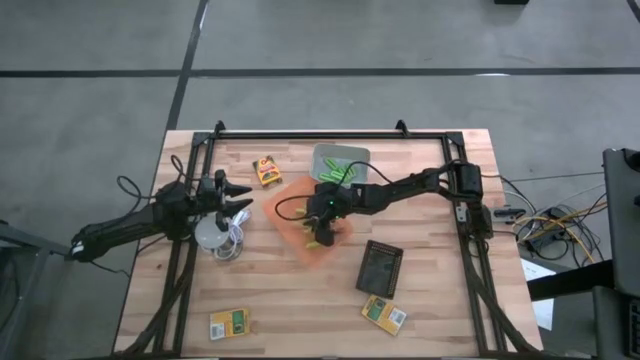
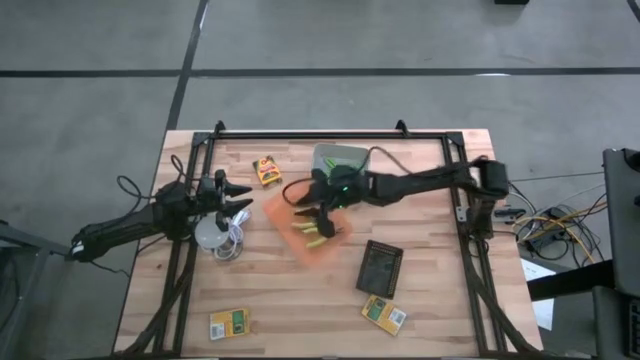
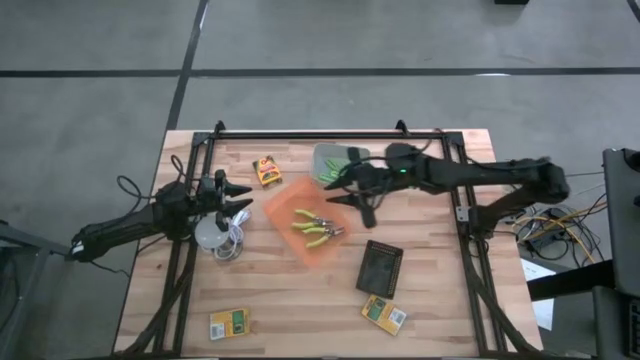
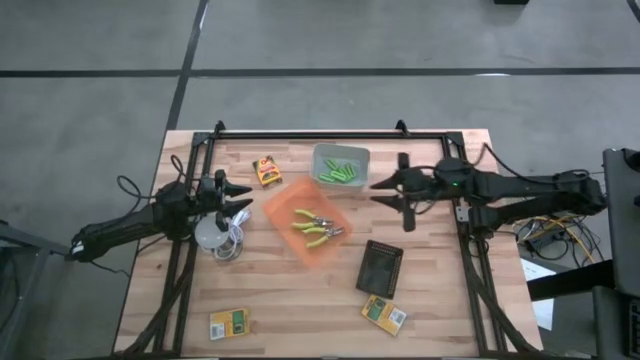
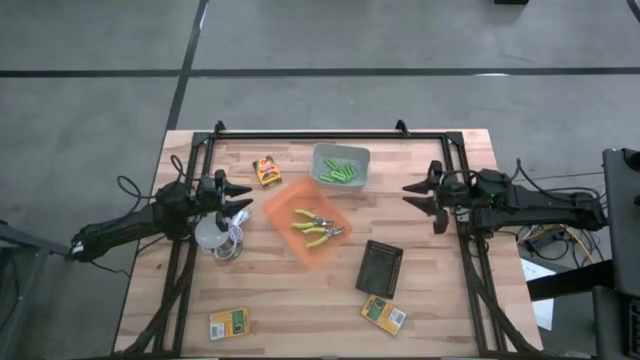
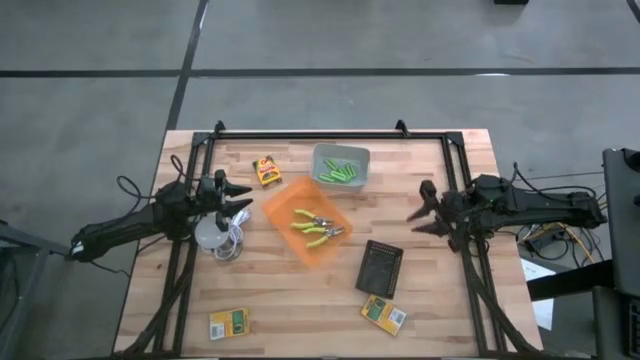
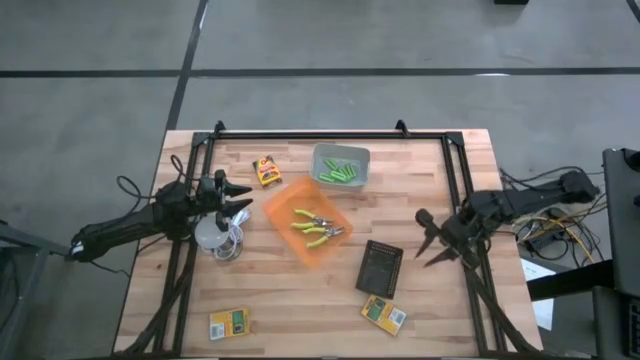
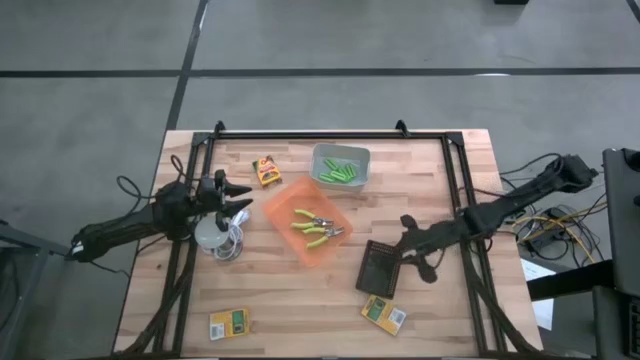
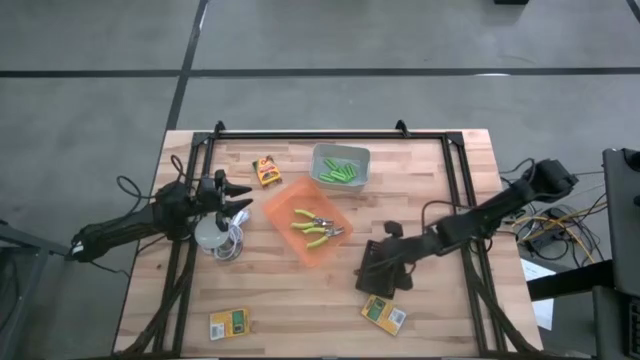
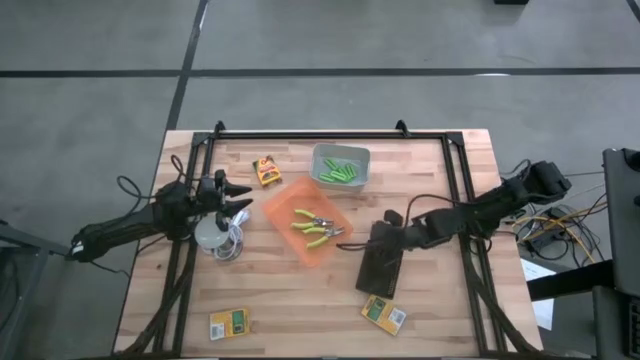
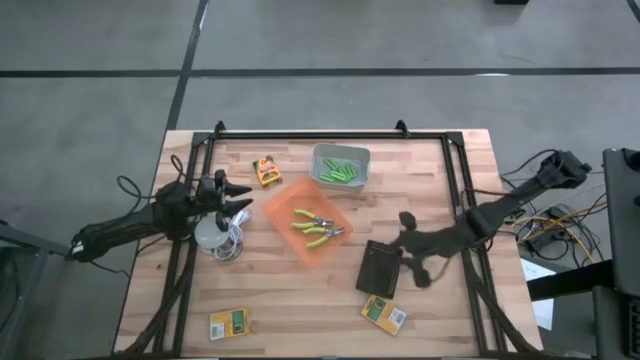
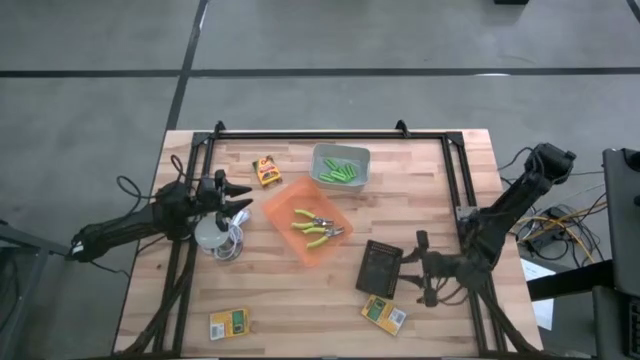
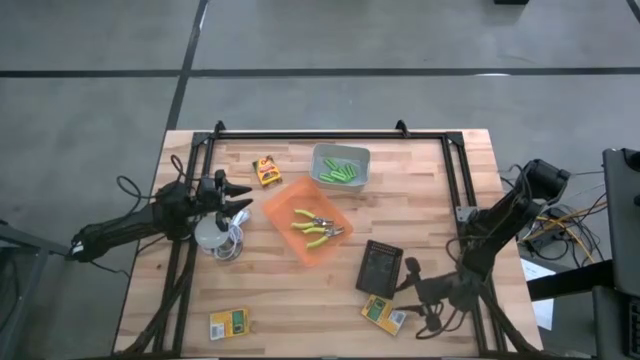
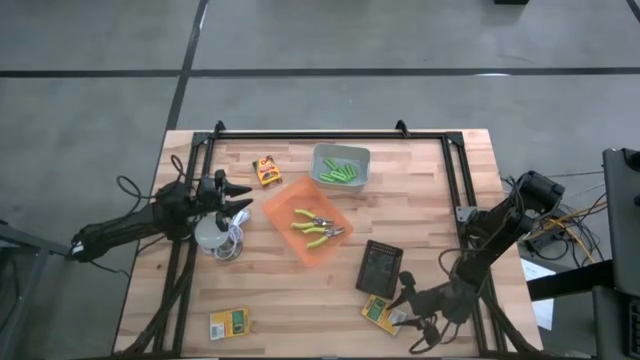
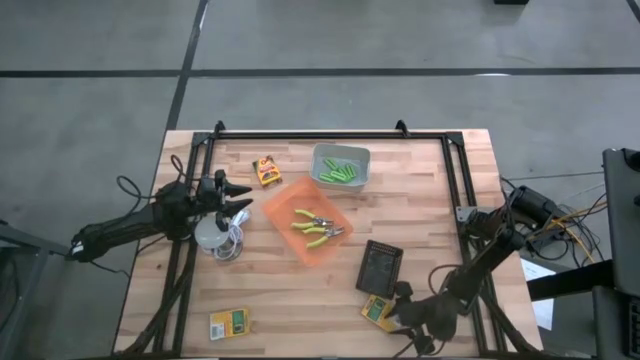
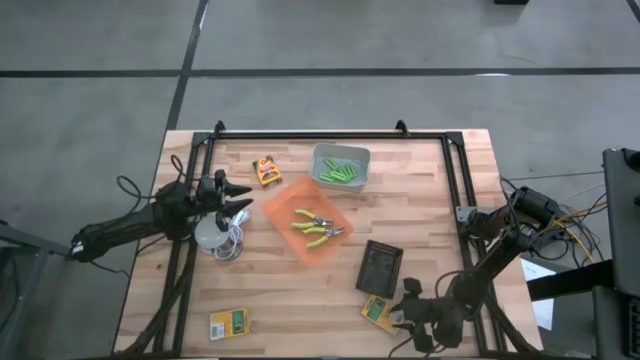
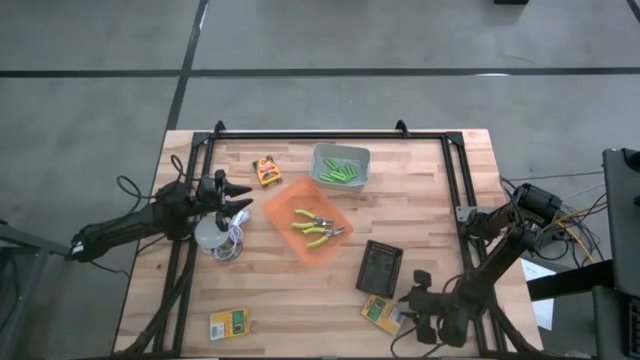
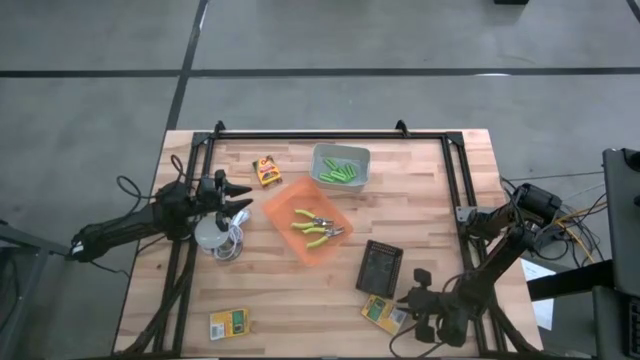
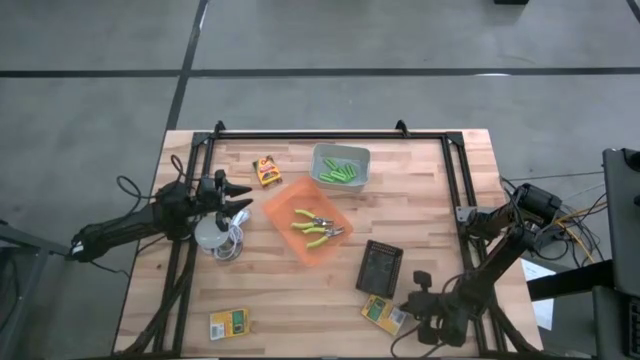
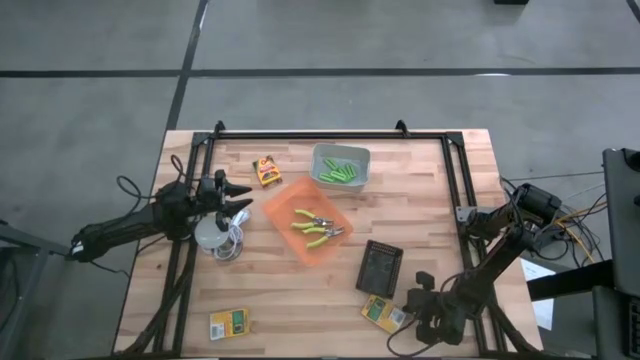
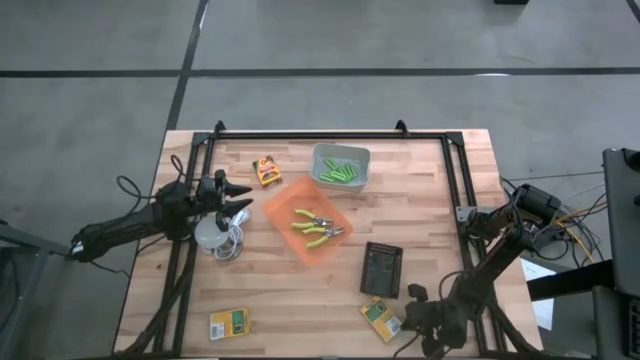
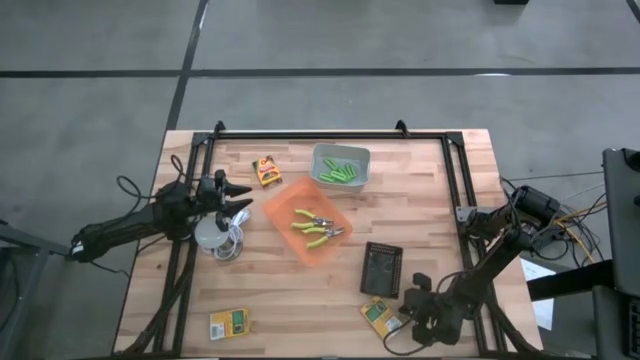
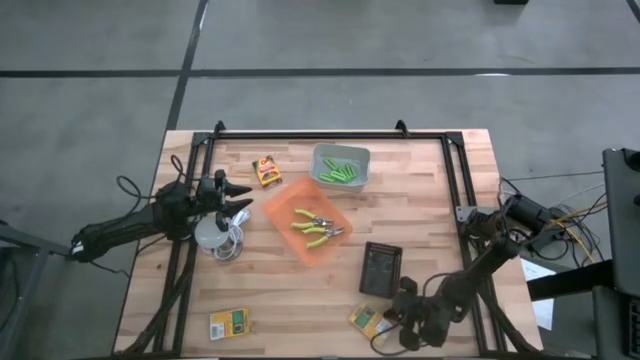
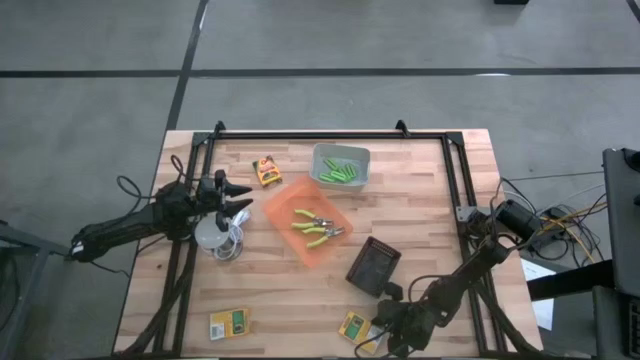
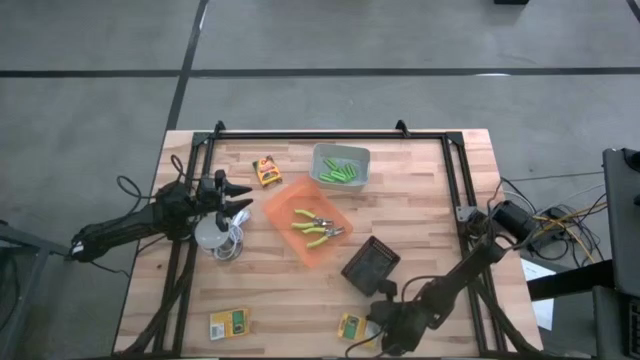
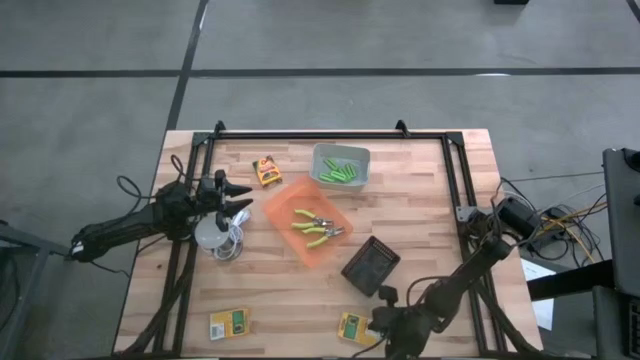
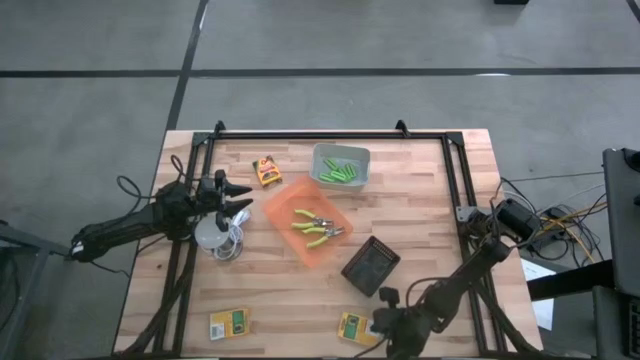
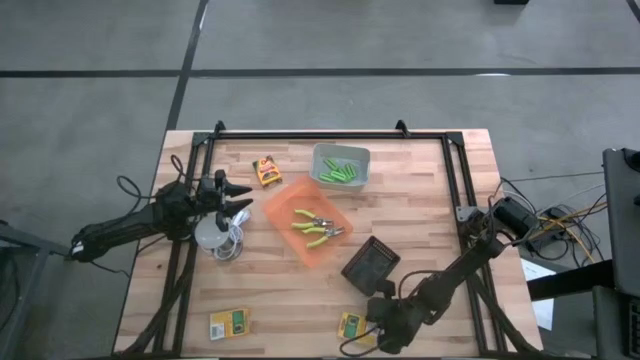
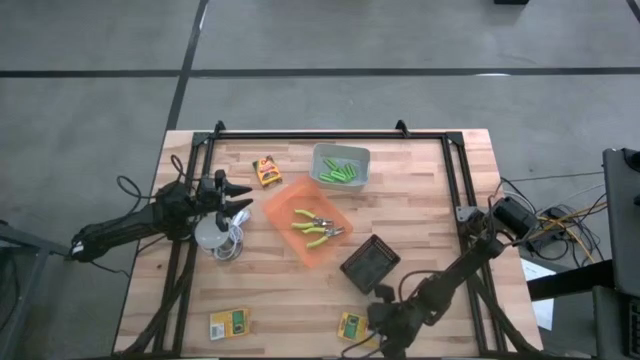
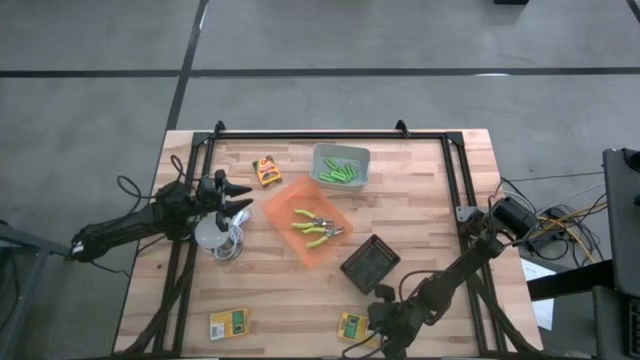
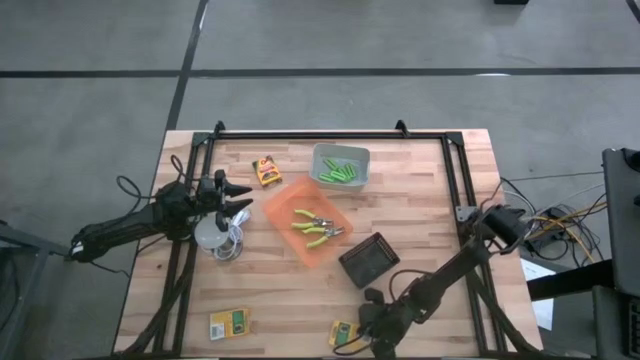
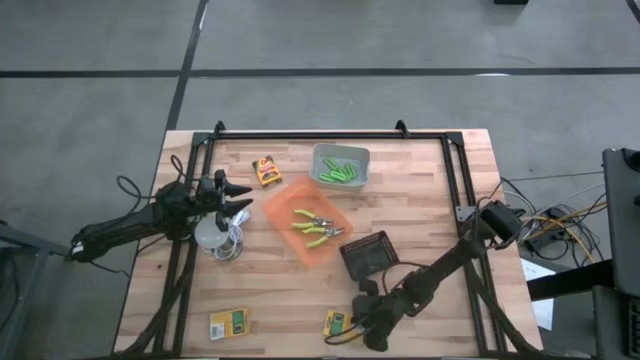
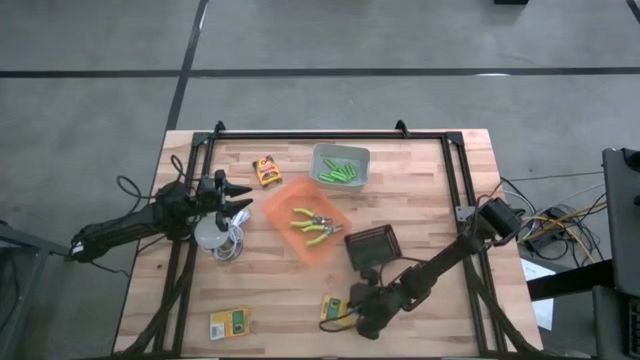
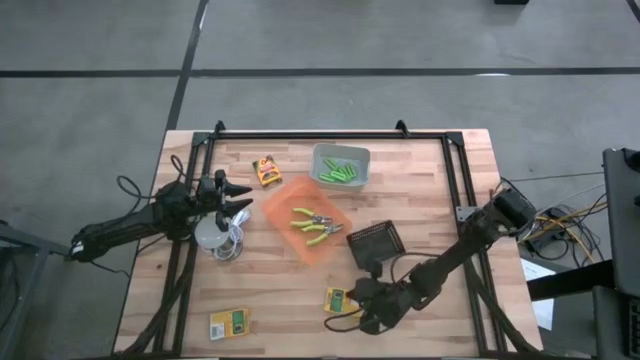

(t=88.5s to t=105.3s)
Task: Pick & Place School Supplies
Put the yellow crayon box into the black bin

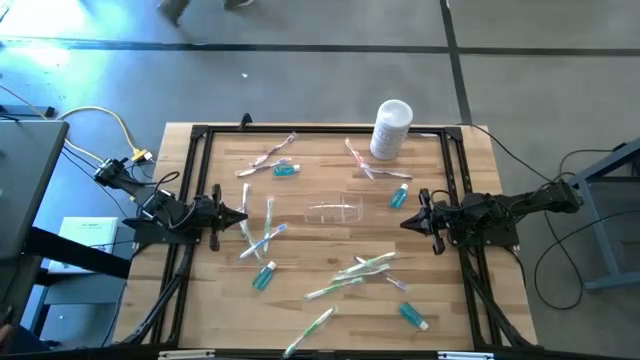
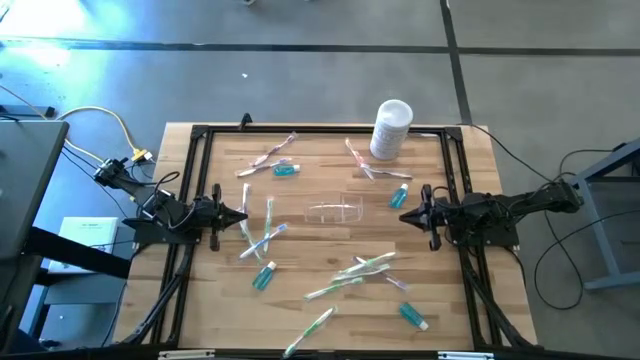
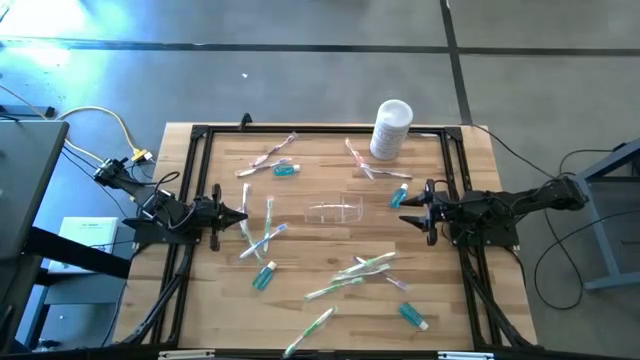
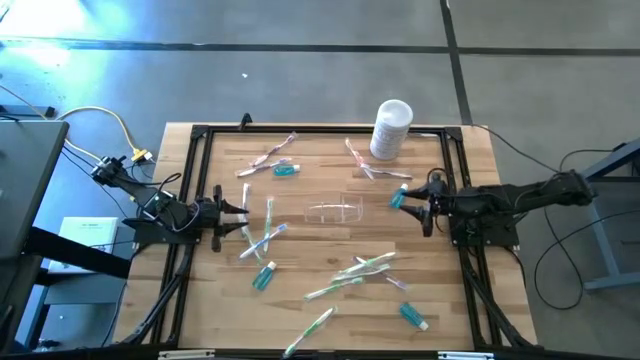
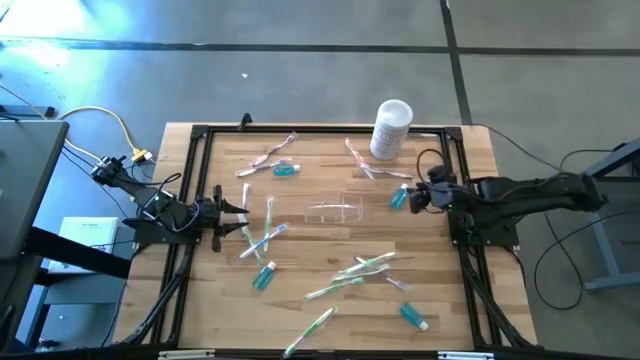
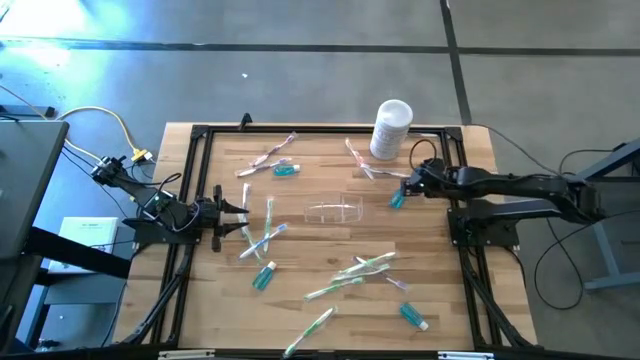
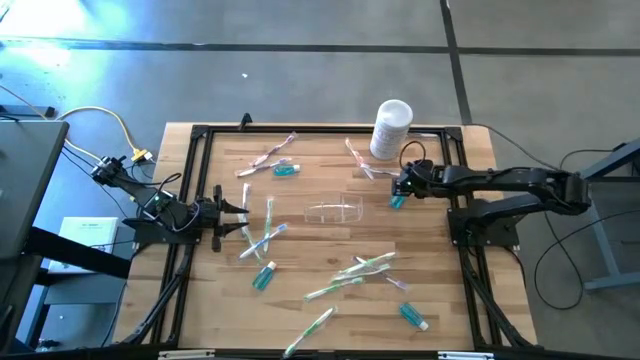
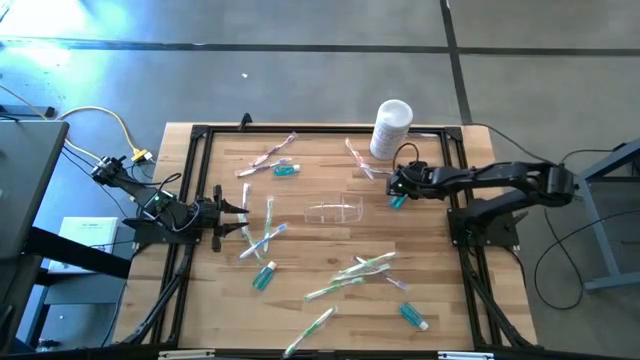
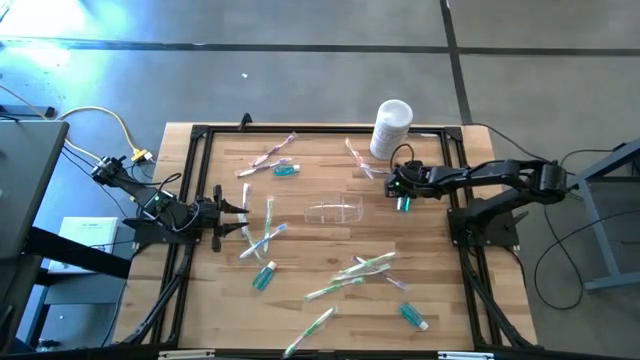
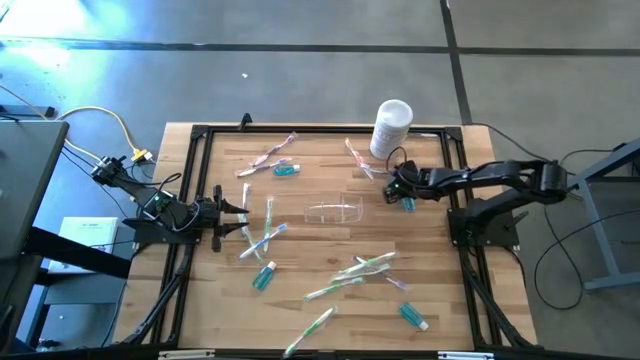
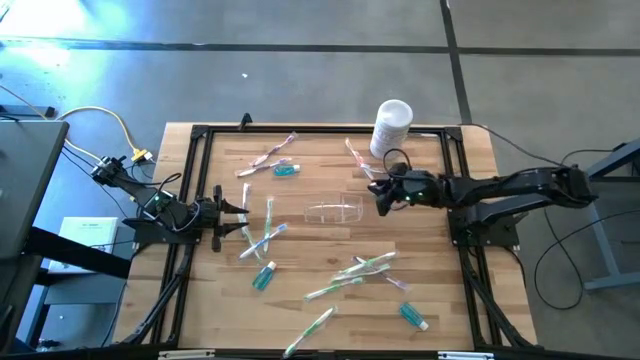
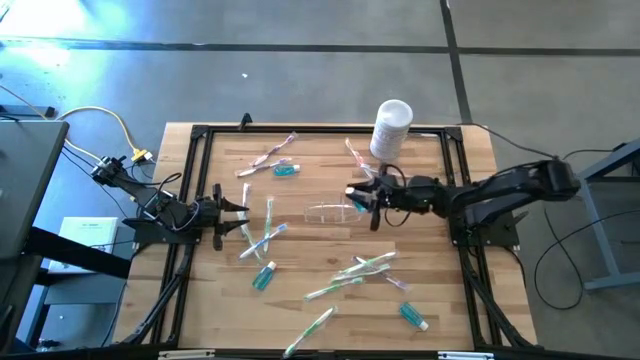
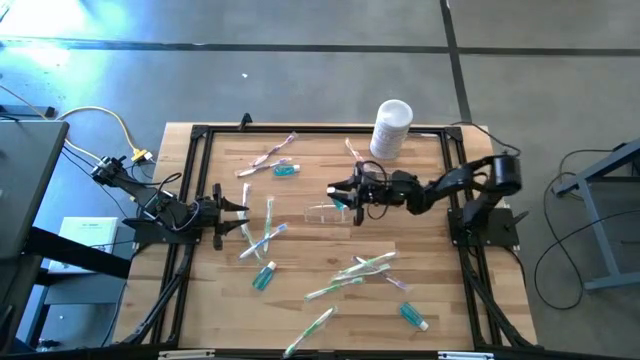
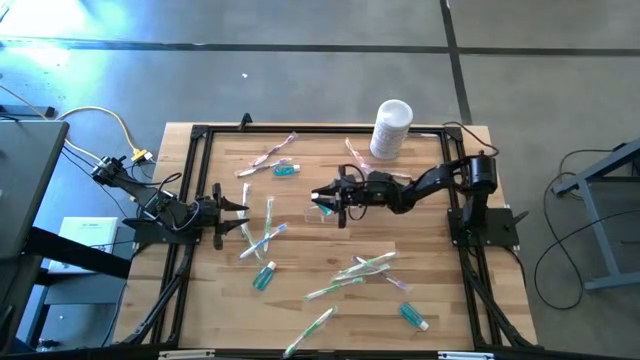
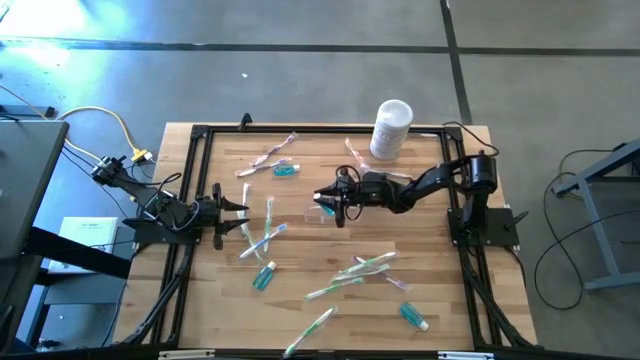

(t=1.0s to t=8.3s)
Task: Pick & Place toothbrushing station
Put the blue mouthwash bottle into the transparent organizer
